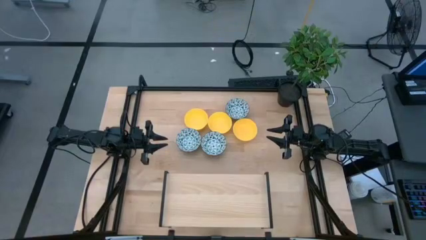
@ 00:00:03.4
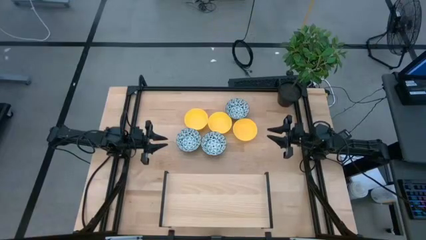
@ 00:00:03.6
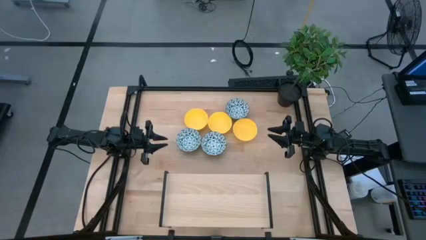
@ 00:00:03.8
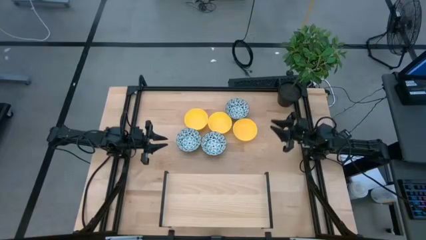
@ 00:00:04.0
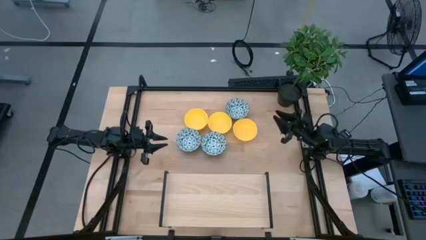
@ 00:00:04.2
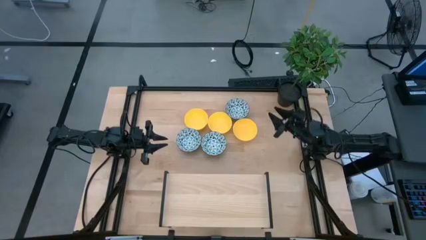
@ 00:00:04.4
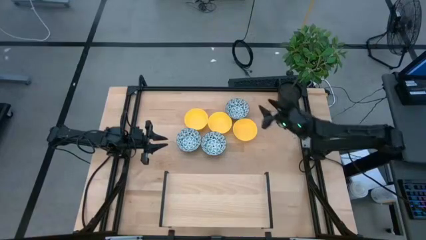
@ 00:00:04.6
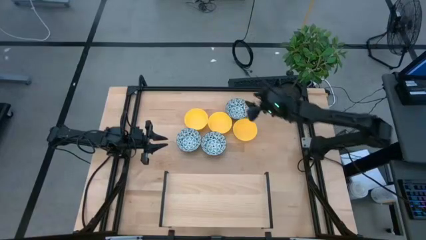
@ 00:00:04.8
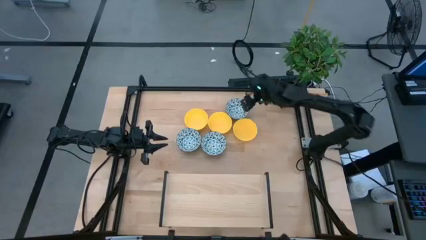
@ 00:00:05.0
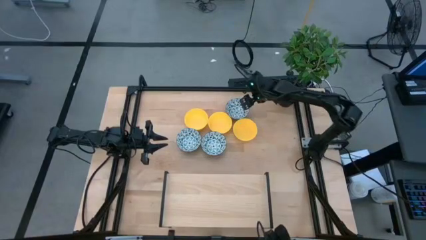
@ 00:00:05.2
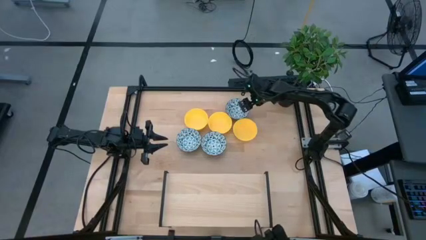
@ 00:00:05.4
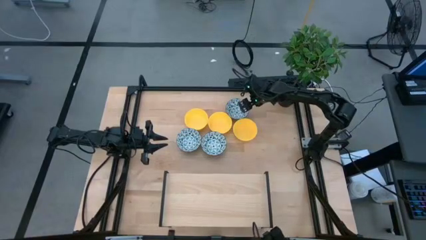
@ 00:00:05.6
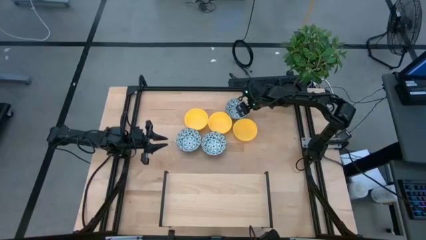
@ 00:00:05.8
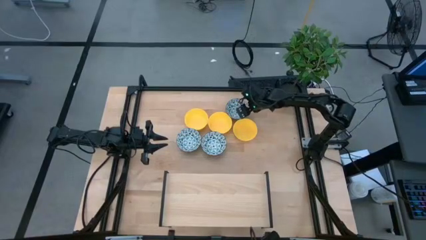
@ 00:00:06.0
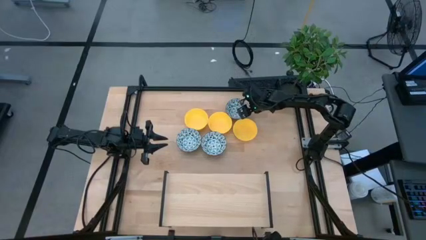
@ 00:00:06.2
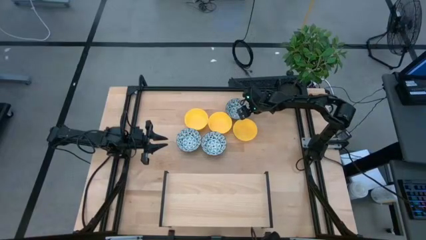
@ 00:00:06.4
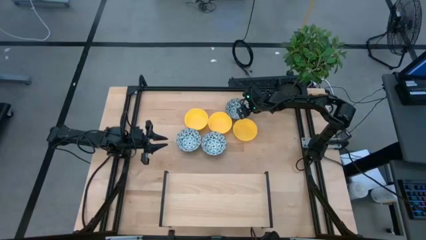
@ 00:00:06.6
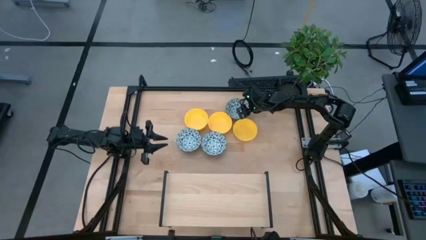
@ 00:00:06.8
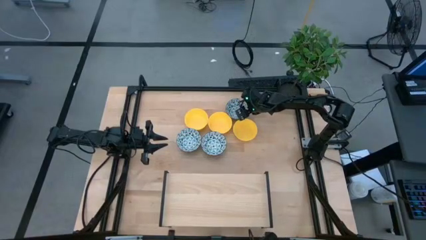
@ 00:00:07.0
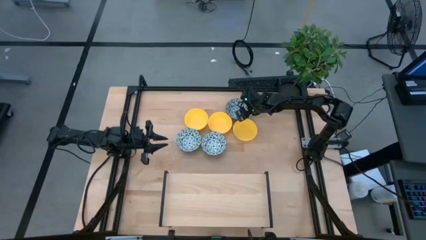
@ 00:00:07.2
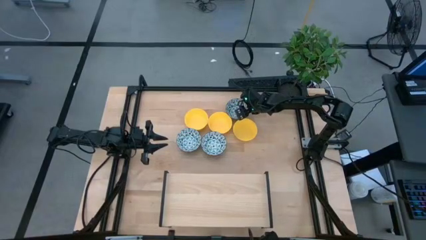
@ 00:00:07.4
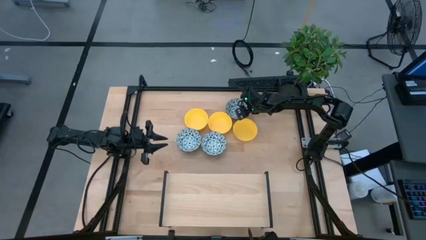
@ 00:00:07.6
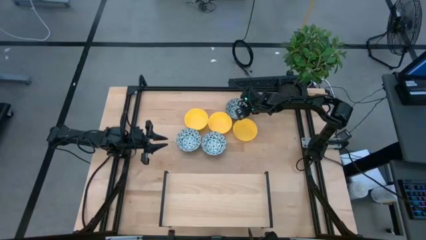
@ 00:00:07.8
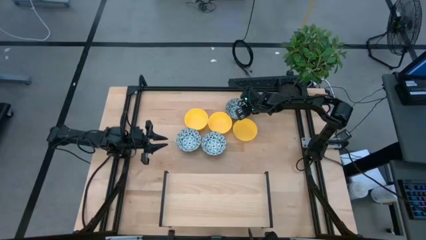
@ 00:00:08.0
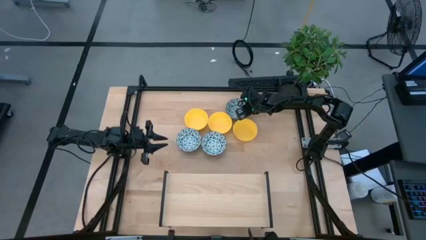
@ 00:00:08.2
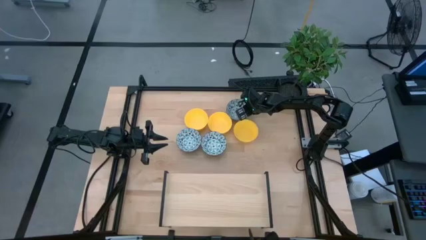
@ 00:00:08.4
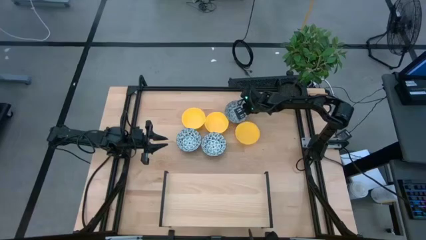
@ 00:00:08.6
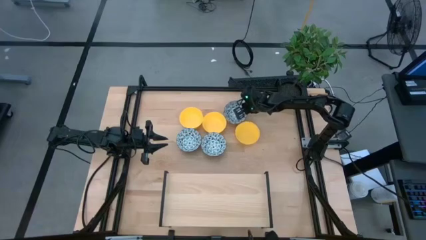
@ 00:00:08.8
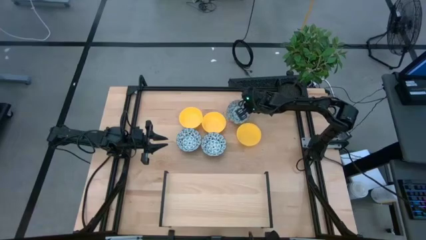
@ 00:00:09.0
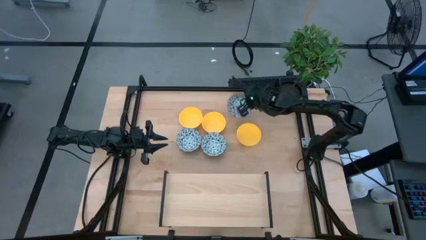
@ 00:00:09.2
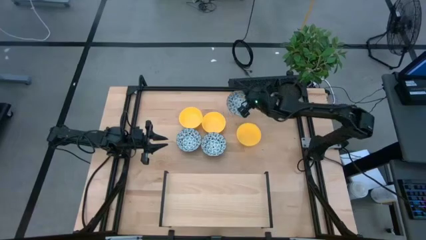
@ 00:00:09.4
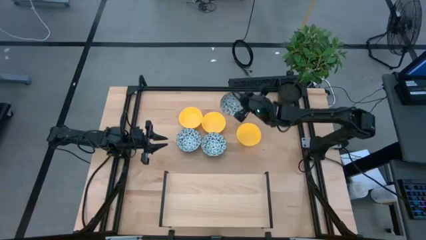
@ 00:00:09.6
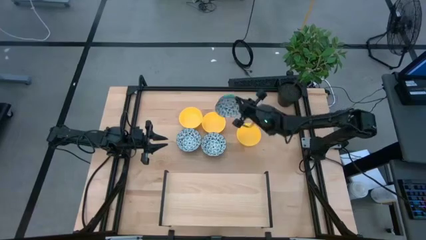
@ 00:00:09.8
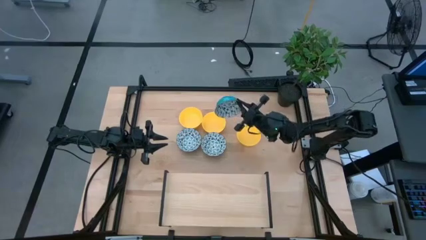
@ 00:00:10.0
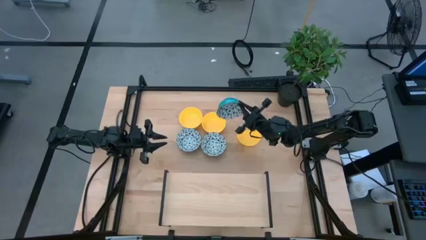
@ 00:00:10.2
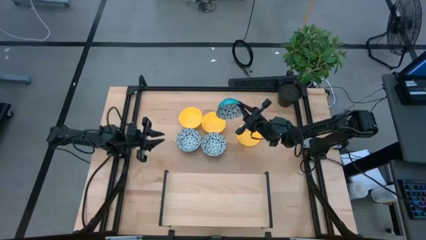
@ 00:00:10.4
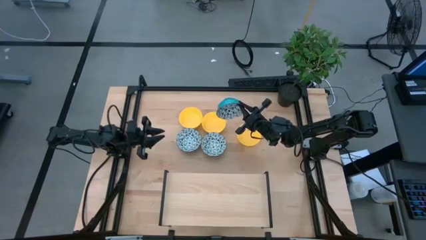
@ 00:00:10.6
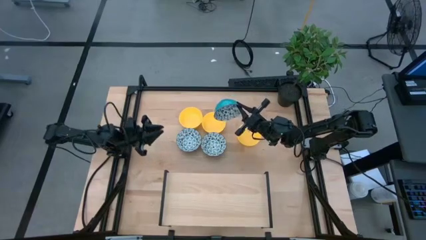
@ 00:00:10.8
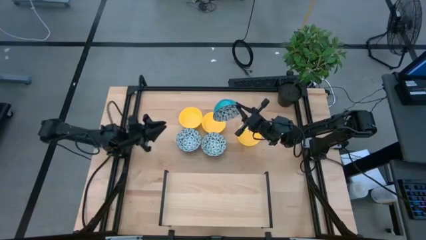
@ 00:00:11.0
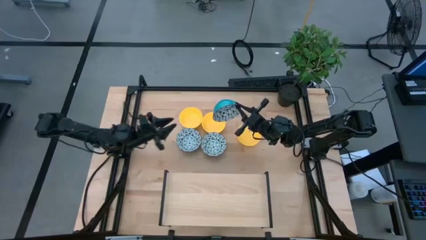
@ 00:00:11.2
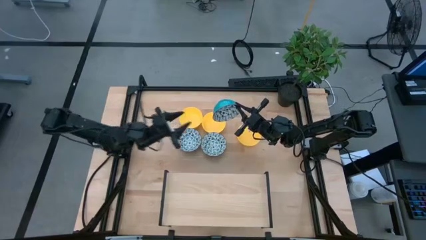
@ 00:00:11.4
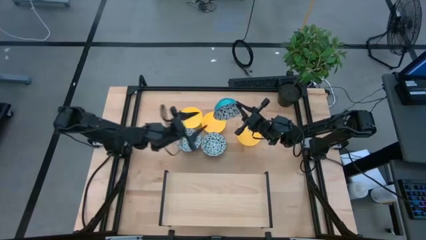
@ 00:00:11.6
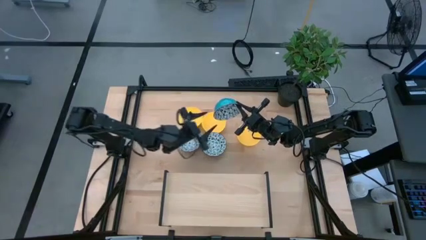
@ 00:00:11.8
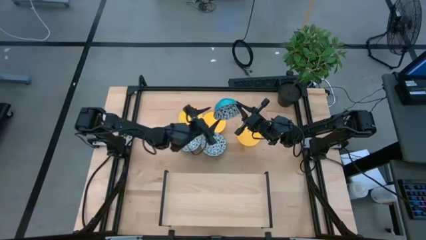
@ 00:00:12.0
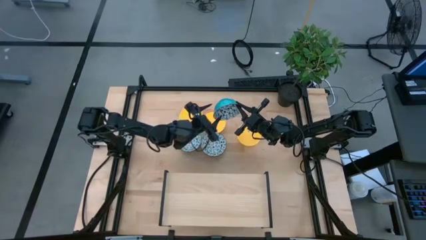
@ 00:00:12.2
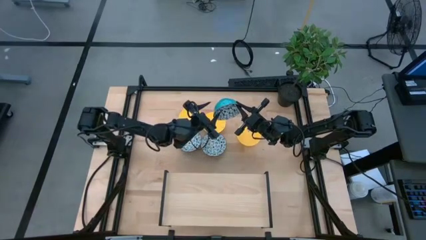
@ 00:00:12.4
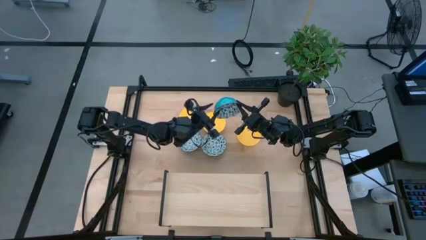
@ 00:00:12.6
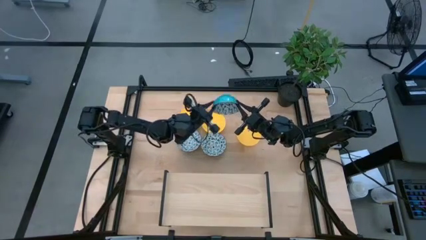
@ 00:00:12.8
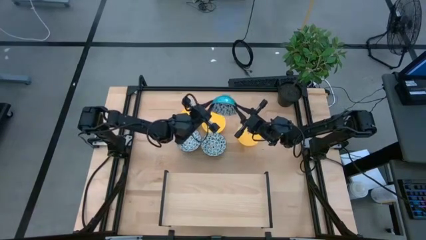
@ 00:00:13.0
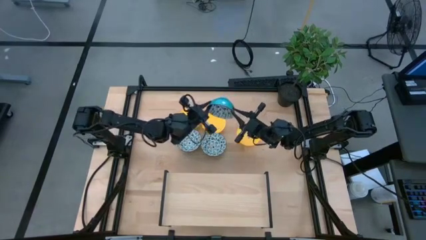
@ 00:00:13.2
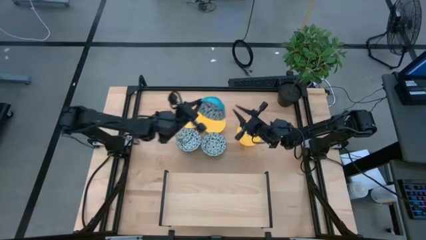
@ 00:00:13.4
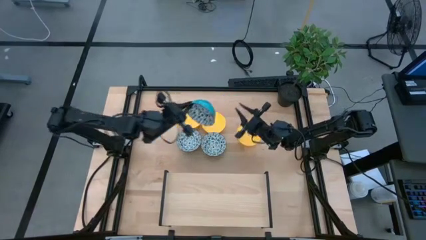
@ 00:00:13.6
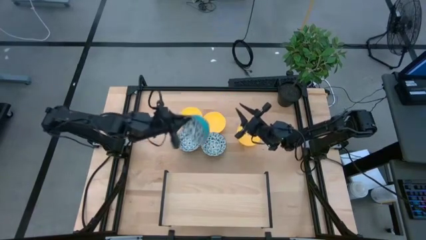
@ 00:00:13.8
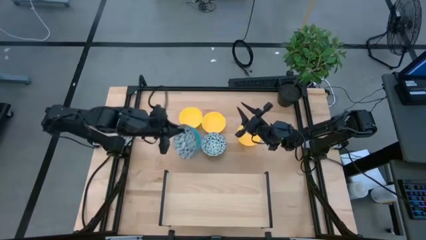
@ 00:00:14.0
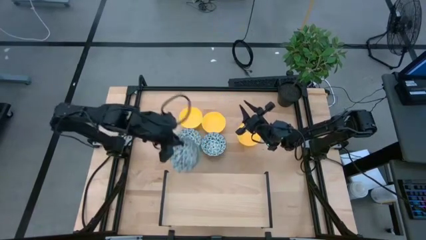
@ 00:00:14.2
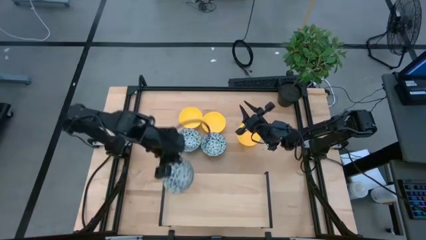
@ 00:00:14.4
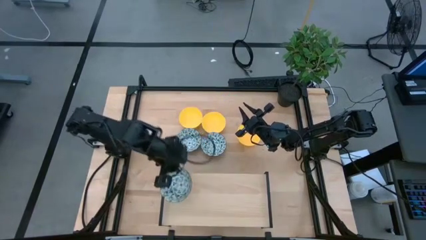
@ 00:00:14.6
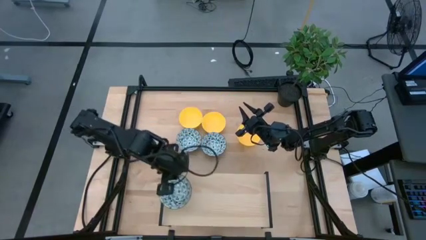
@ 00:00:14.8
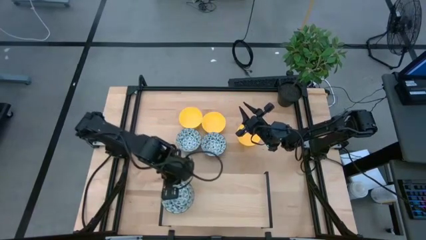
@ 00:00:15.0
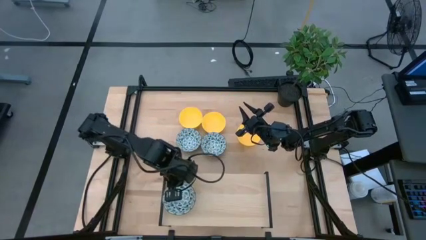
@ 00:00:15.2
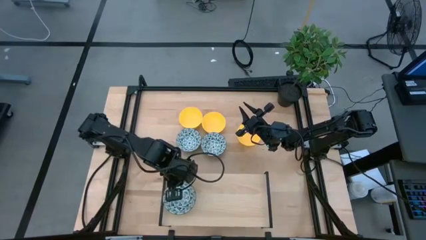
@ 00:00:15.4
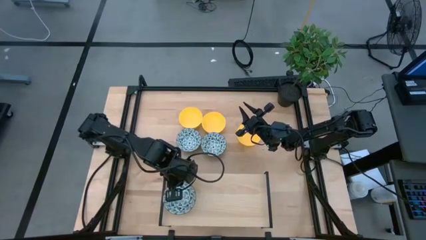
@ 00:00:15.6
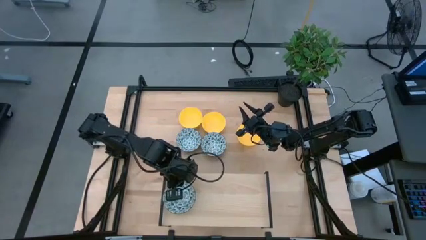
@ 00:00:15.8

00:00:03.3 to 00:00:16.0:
Task: Pick & Place Mini bowls
Put the top white bowl on the shelf
